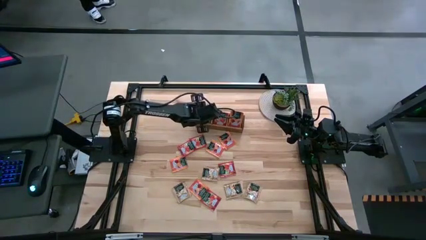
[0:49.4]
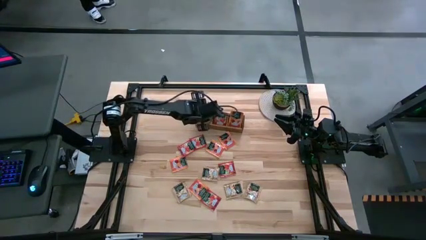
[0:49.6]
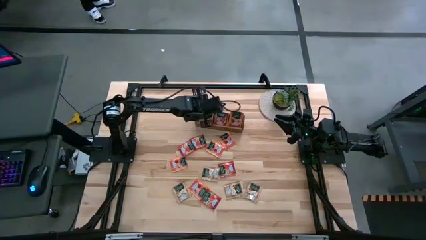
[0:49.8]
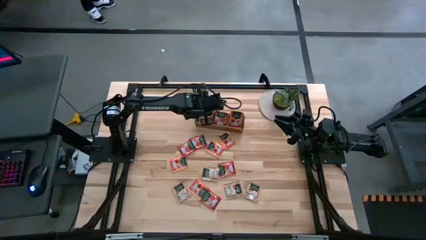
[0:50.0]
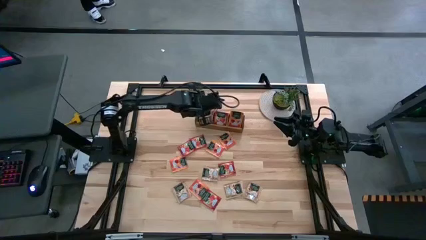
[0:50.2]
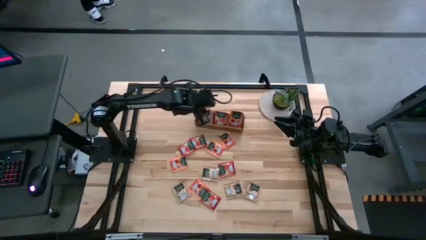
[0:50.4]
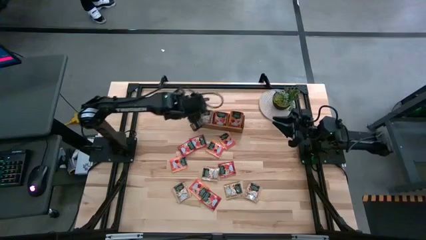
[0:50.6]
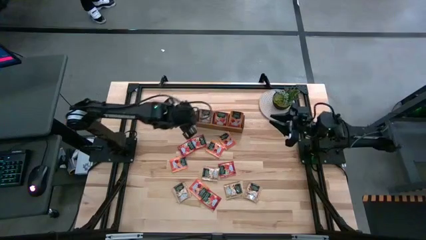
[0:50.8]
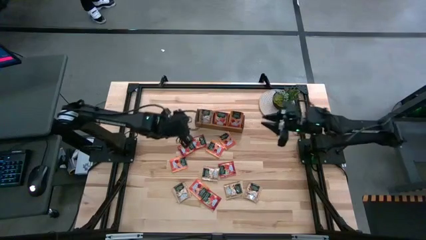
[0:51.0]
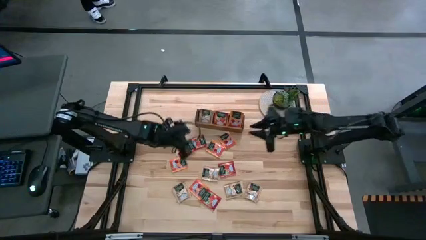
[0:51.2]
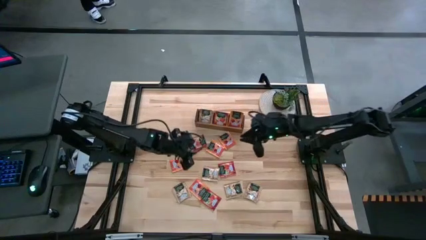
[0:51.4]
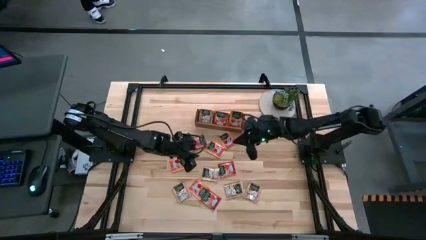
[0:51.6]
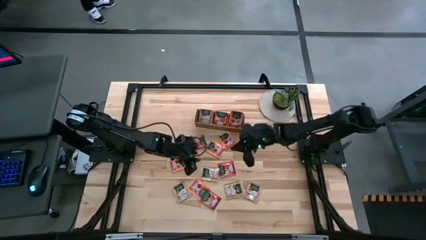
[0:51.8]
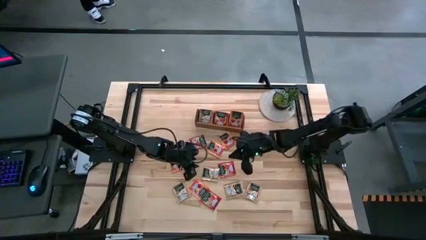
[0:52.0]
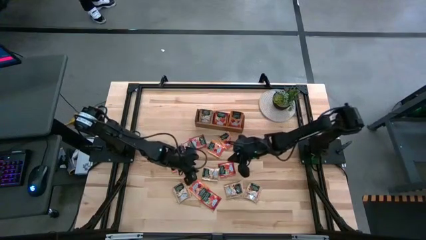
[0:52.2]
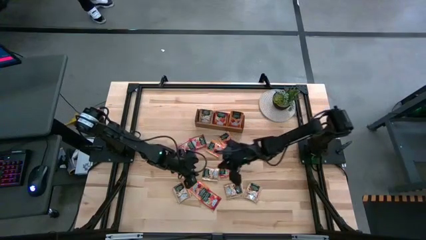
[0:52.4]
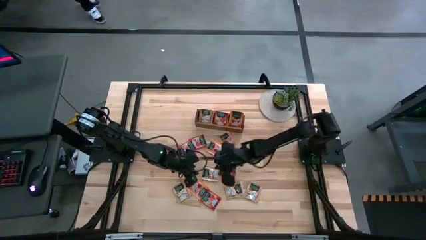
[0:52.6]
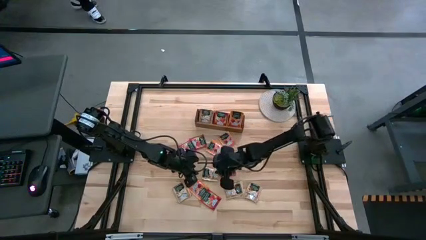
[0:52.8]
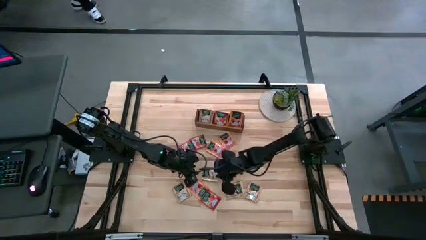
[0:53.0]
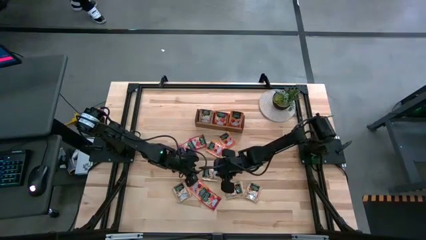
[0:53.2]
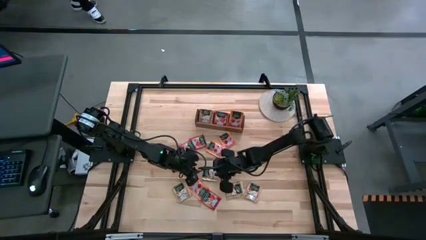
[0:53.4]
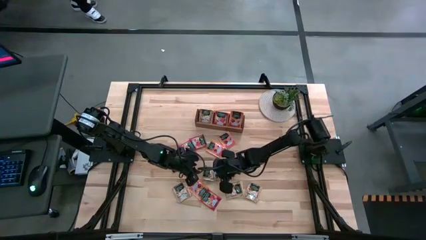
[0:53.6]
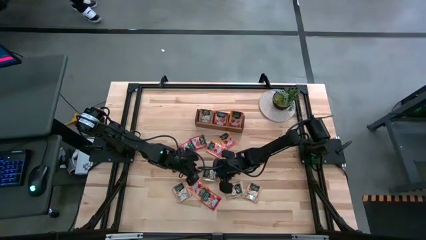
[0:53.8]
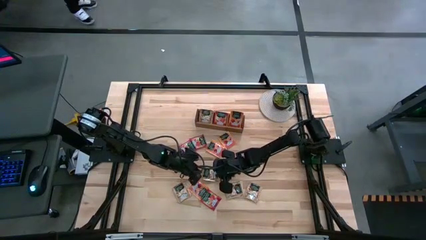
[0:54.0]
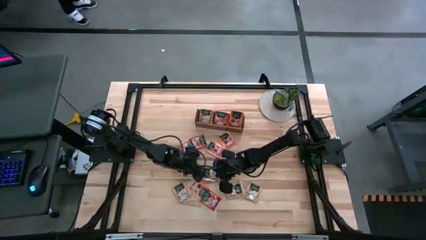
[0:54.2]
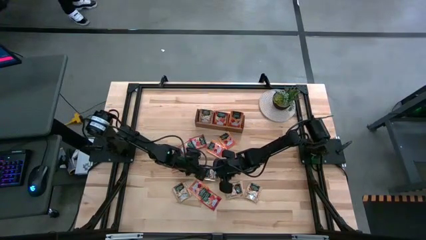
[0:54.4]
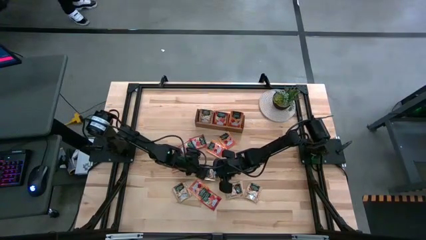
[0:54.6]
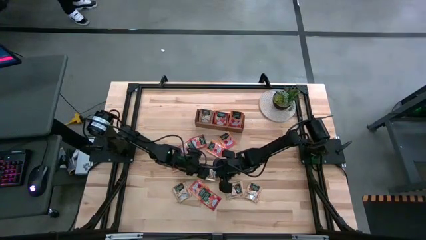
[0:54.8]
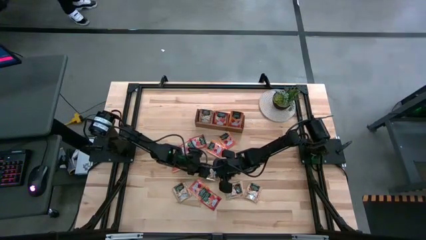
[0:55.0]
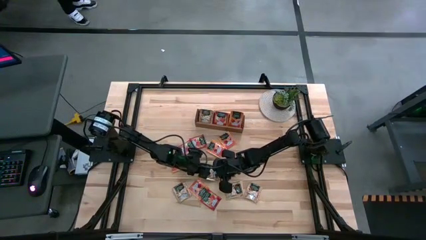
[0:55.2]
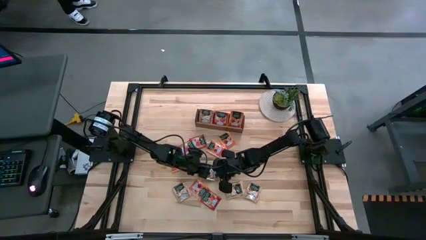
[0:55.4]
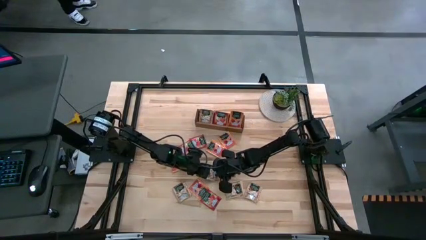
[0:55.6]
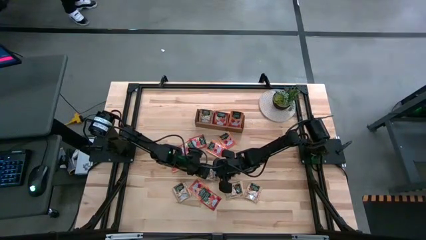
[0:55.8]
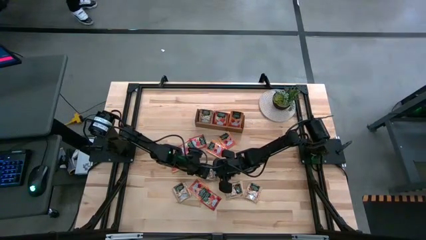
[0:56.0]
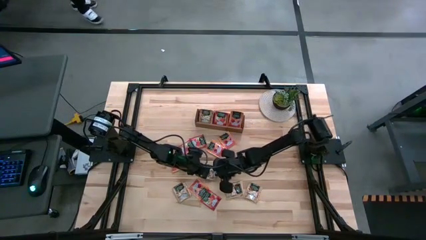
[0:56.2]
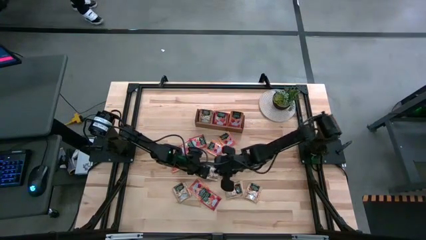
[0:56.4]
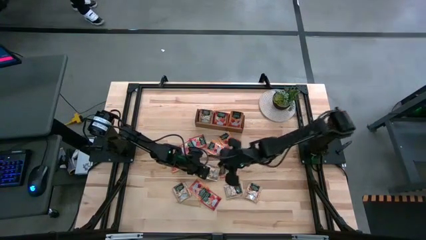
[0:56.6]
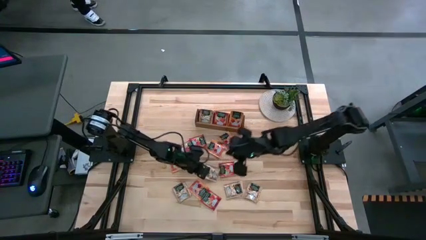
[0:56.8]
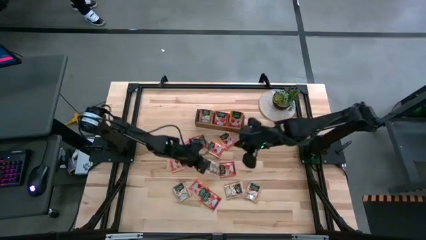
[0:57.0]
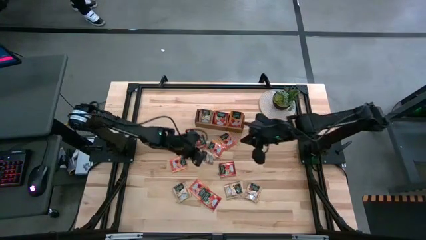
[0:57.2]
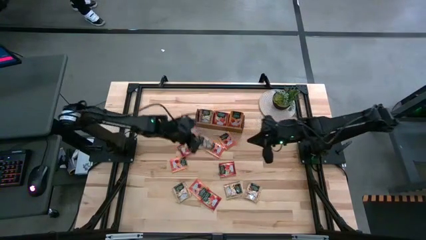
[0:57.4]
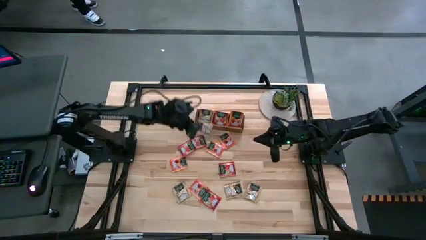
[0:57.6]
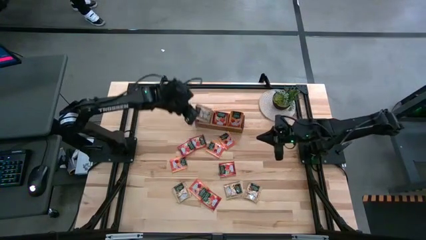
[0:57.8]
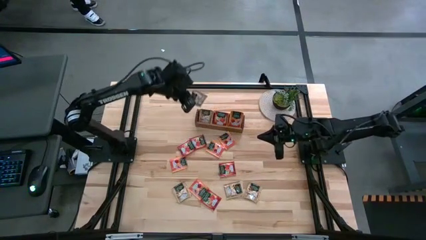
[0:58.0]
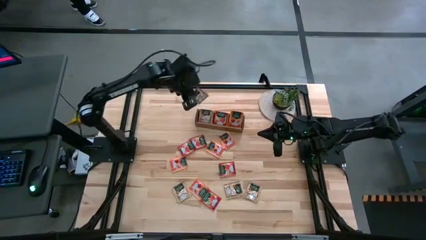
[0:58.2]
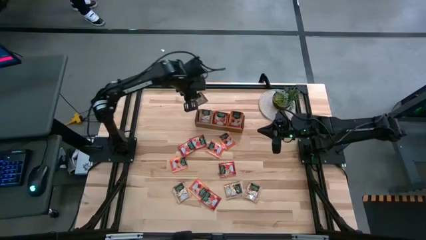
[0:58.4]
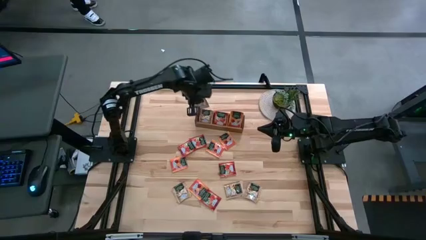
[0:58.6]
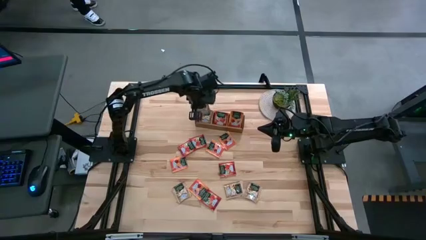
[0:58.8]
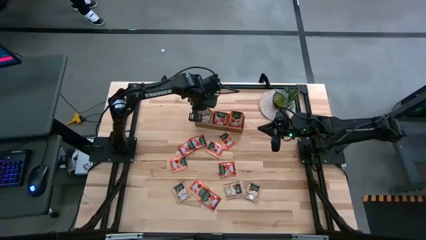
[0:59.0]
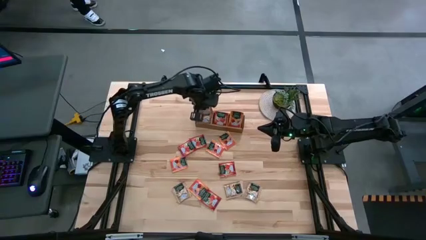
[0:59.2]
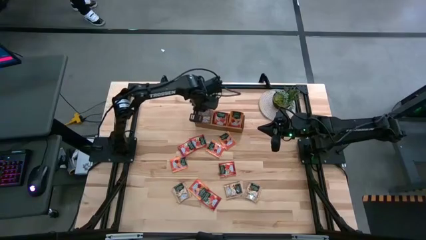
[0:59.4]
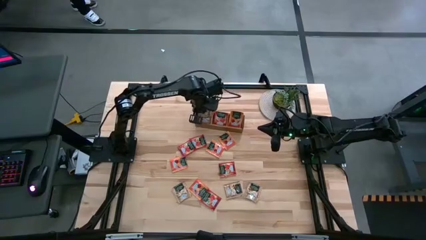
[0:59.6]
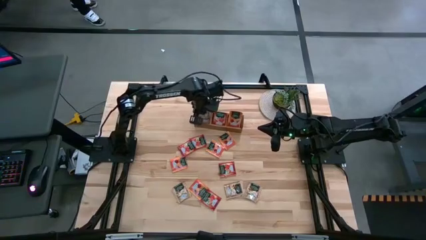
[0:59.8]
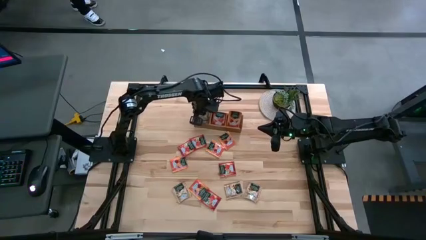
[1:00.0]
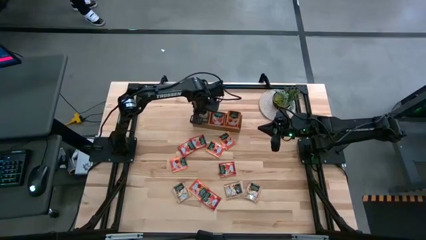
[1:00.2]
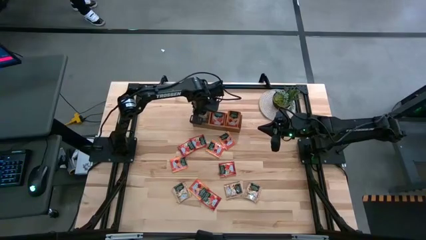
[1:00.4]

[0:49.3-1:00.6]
Task: Pick & Place Tea
Put the brown tea bag into the left section of the wooden organizer

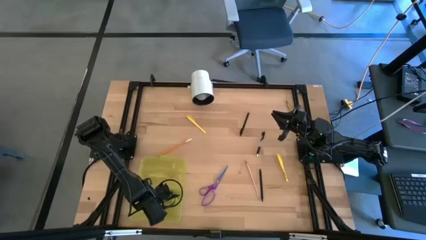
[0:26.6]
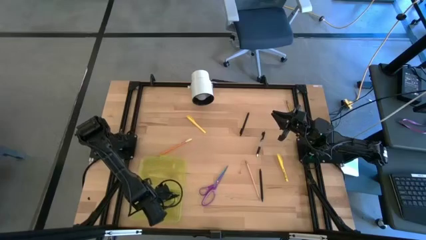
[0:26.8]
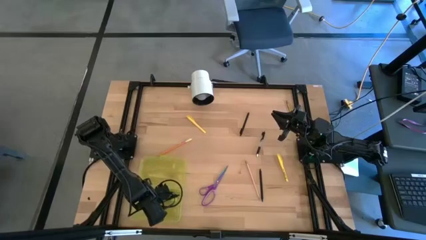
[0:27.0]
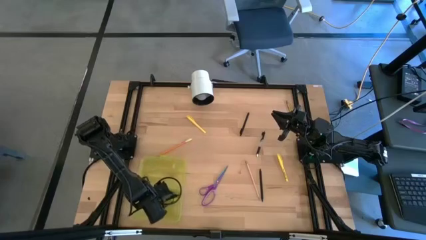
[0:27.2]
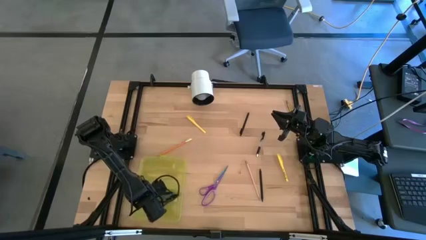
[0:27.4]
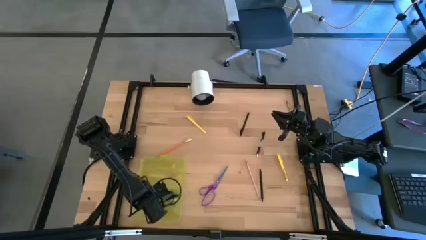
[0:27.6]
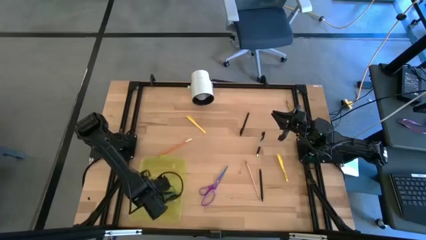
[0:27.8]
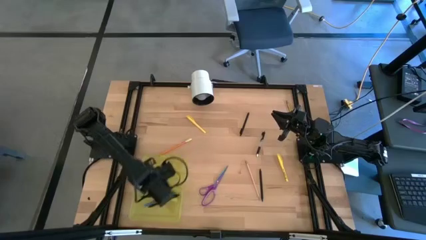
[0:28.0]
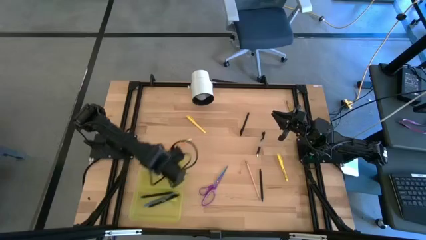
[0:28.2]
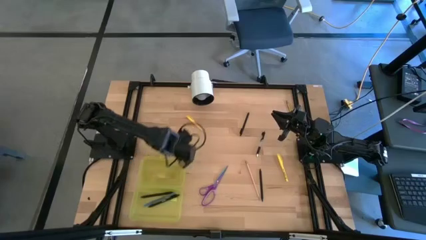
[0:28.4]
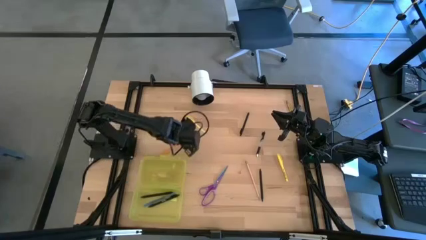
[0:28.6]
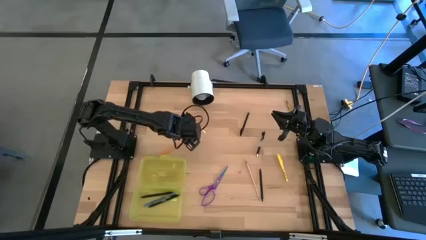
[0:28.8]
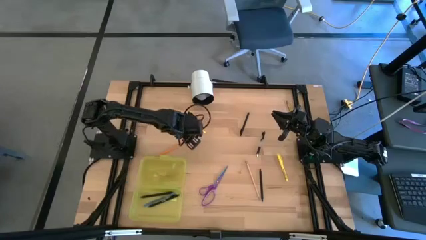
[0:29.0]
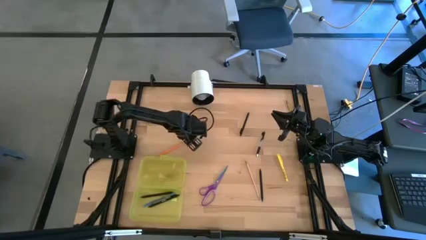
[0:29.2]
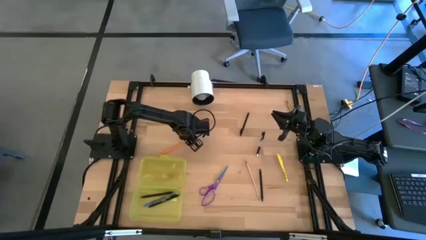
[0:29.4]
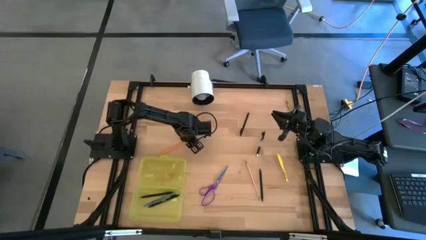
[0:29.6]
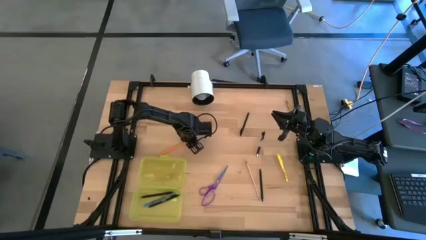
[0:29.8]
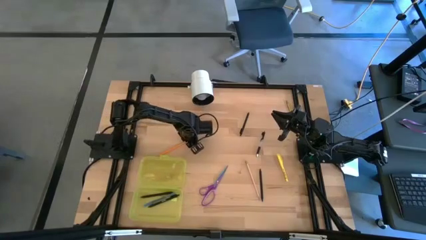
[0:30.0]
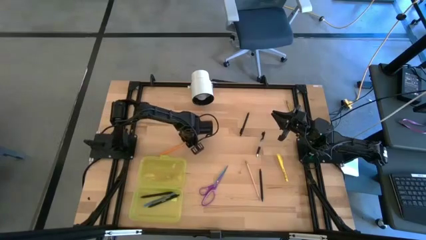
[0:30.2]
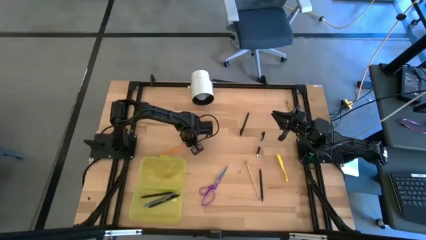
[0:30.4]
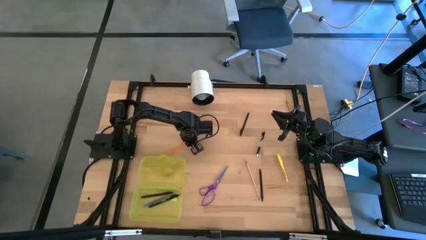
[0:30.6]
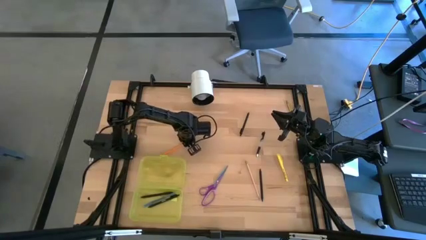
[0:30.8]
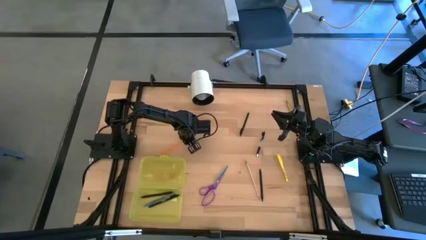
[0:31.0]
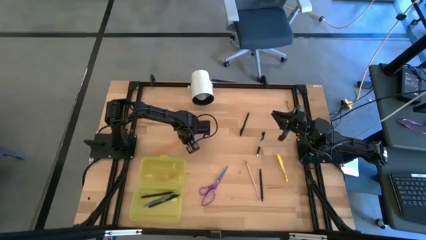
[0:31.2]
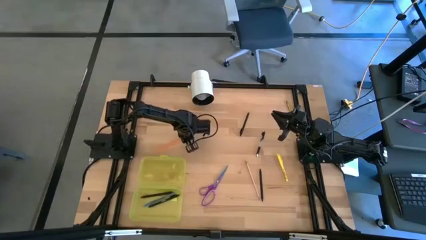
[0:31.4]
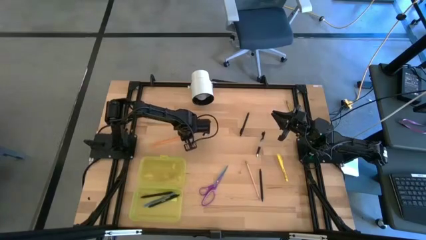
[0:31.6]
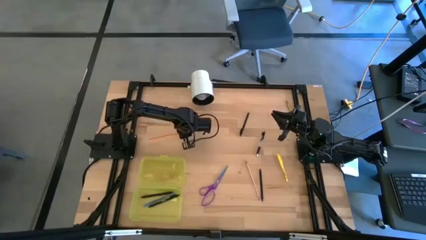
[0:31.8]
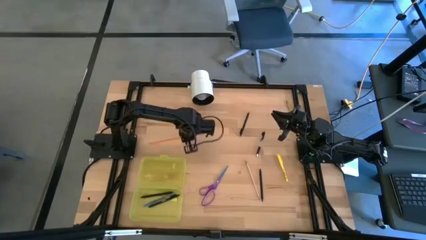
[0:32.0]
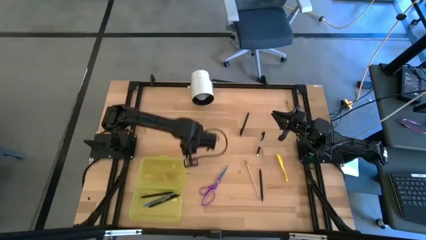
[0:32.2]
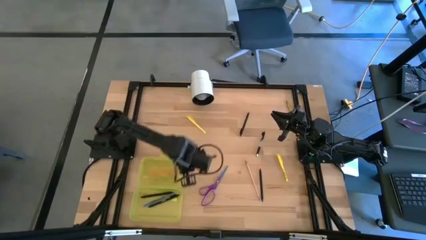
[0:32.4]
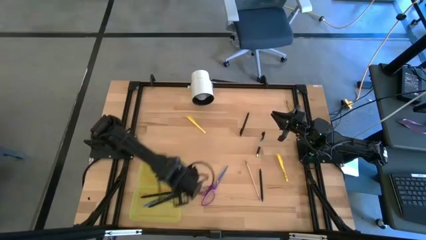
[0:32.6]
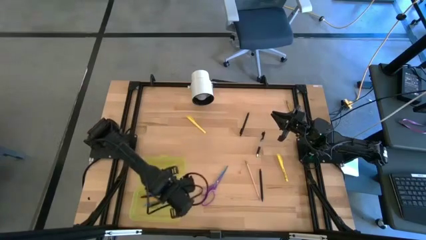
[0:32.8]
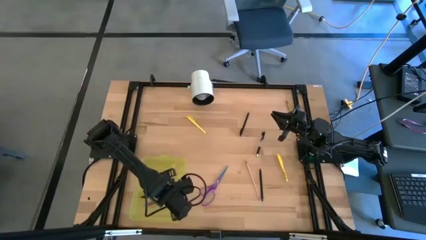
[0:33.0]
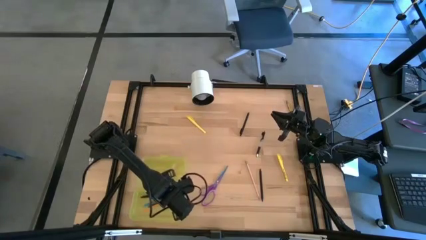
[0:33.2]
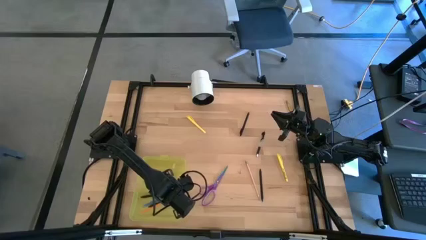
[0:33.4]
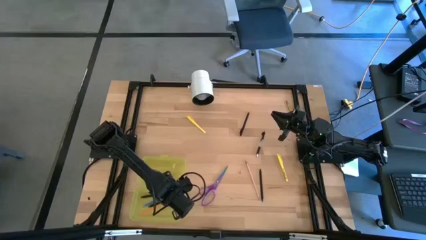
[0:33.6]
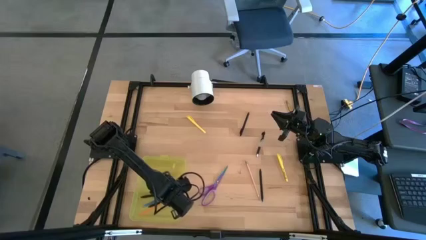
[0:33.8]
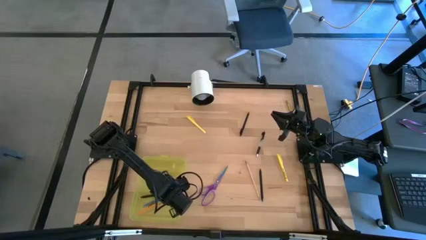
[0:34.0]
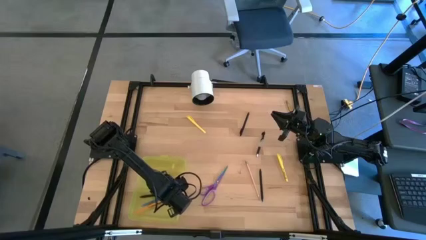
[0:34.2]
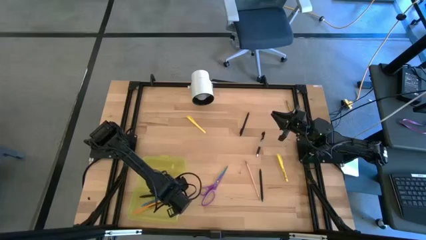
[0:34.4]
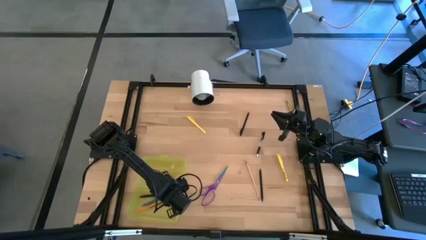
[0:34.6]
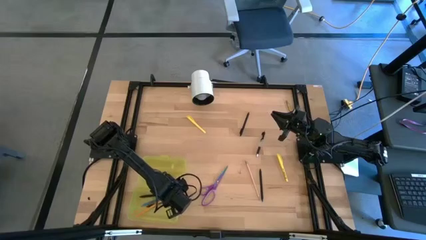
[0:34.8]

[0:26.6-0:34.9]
Task: Pick & place school supplies into a supply box
Put the orange pencil into the yellow supply box
